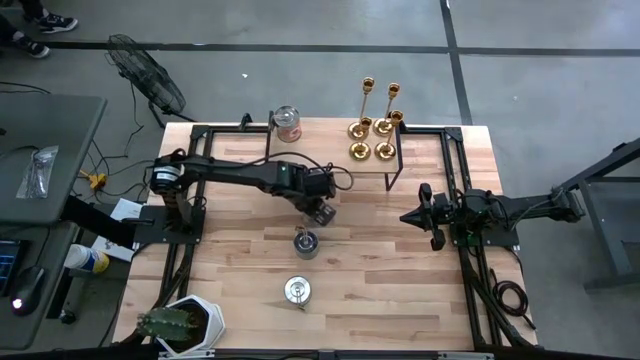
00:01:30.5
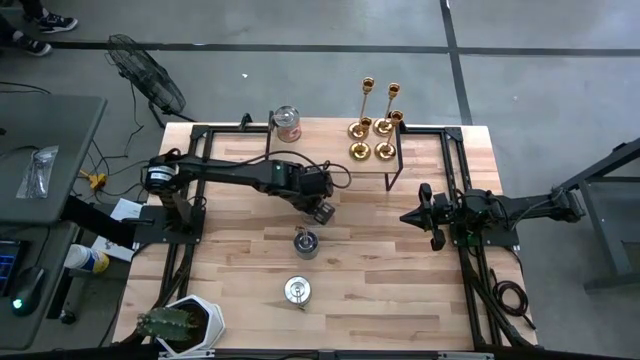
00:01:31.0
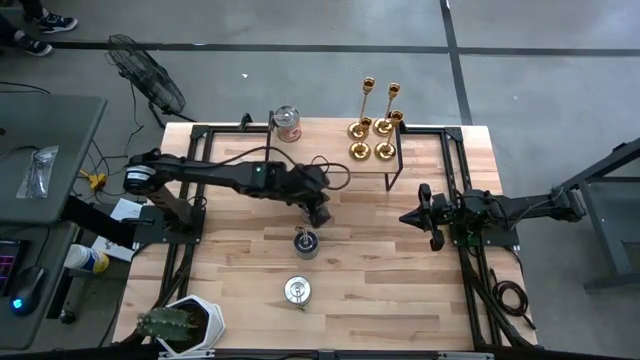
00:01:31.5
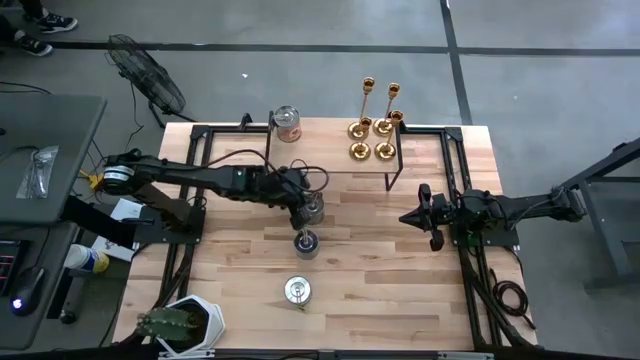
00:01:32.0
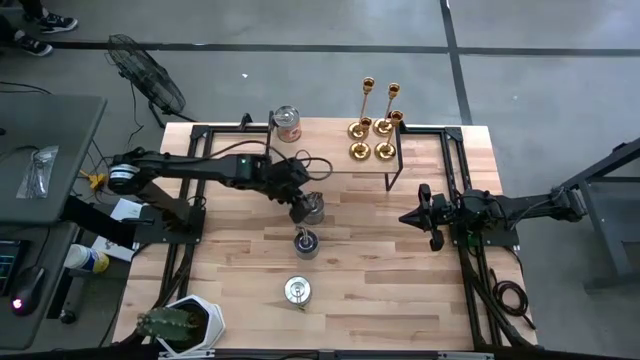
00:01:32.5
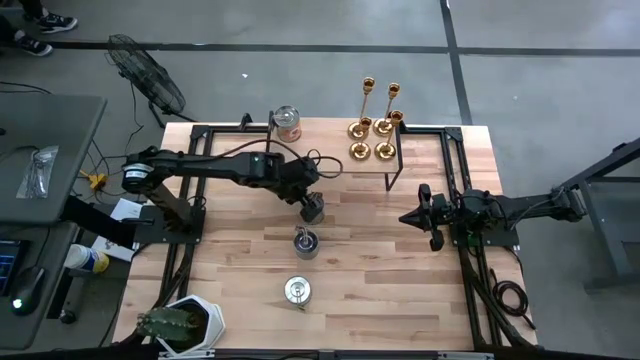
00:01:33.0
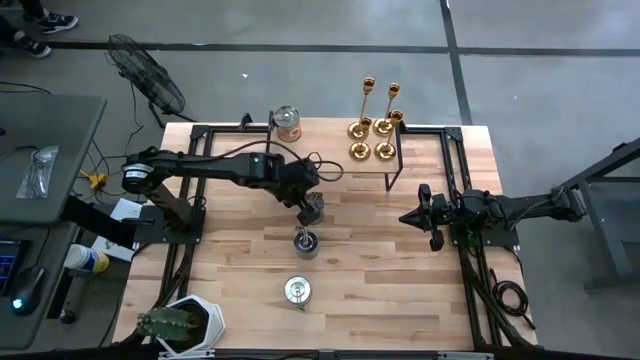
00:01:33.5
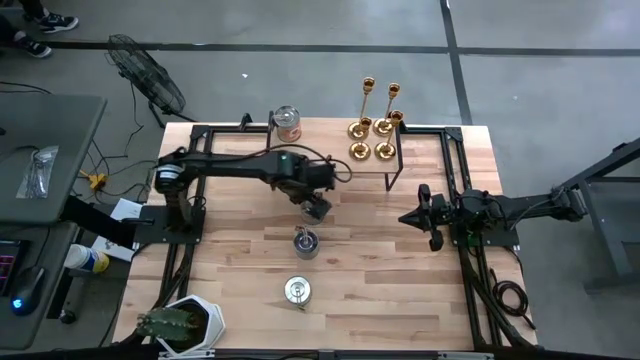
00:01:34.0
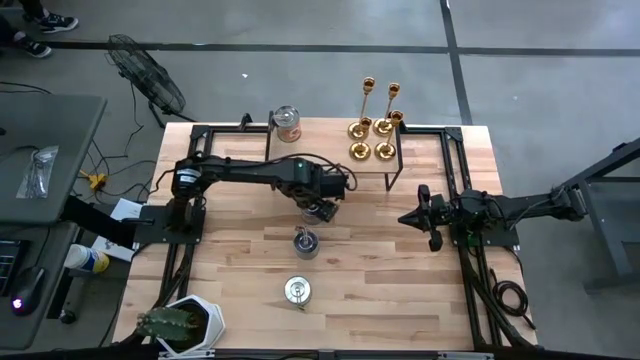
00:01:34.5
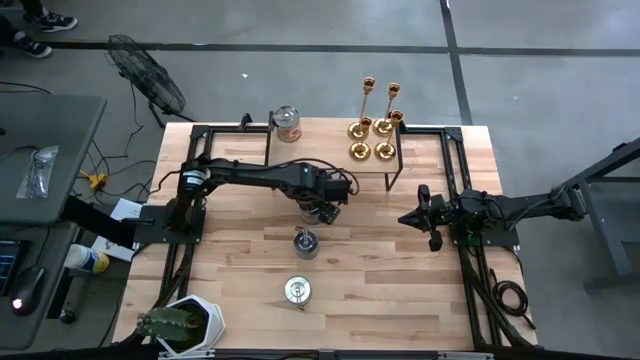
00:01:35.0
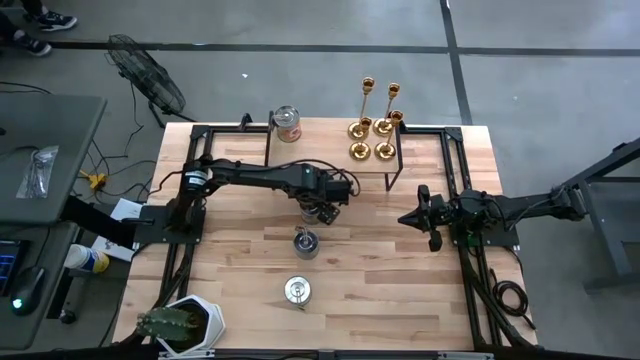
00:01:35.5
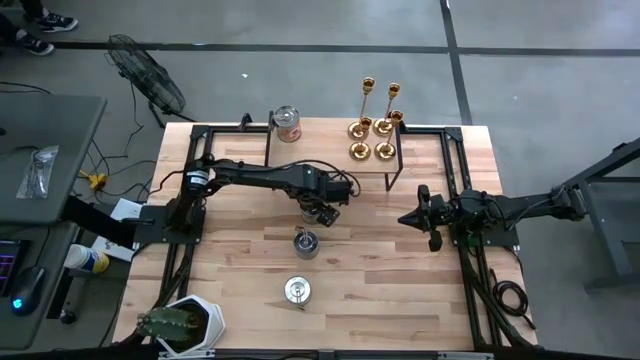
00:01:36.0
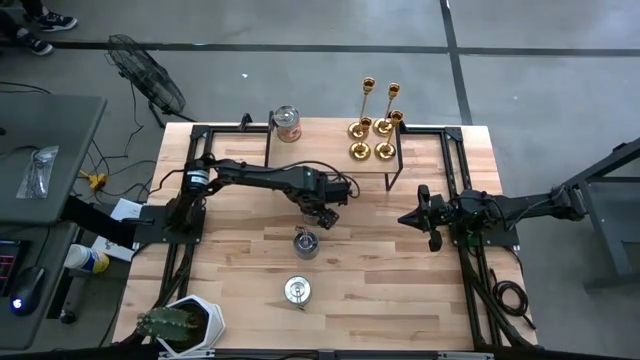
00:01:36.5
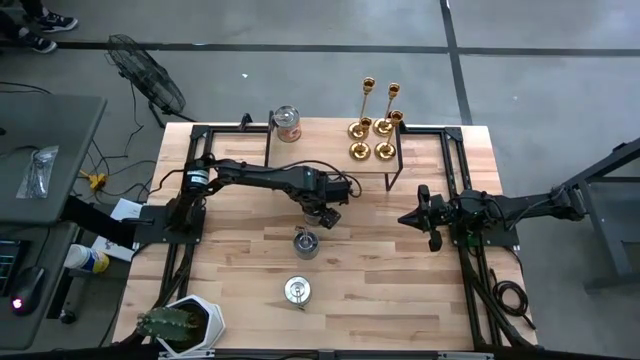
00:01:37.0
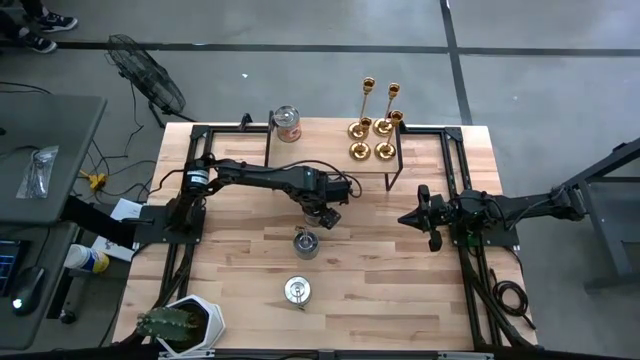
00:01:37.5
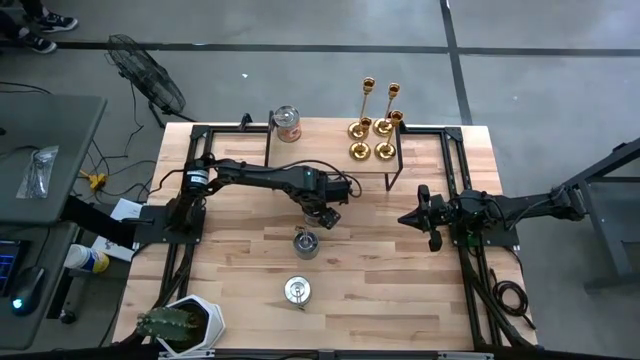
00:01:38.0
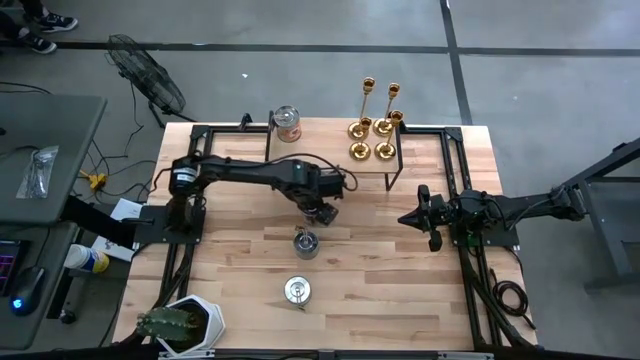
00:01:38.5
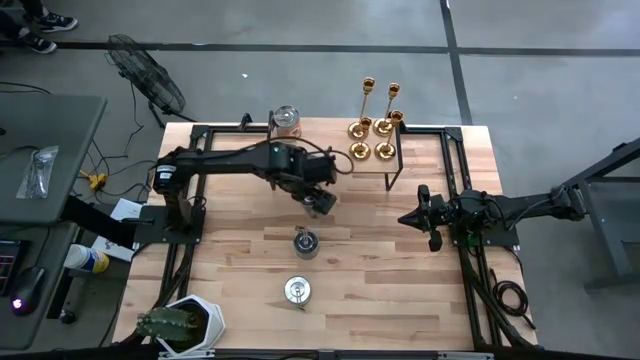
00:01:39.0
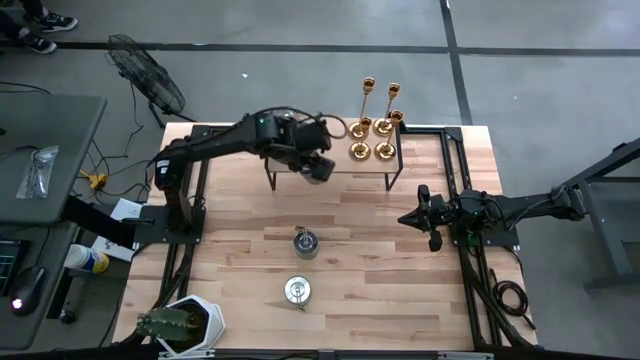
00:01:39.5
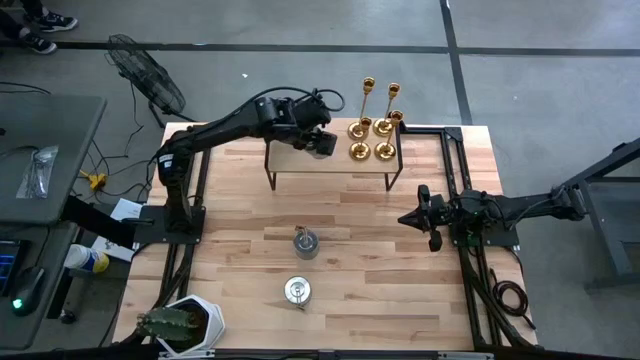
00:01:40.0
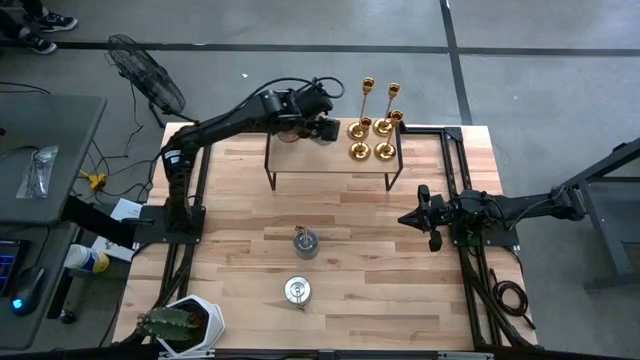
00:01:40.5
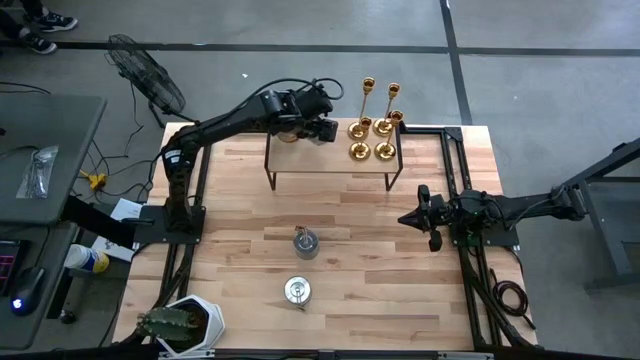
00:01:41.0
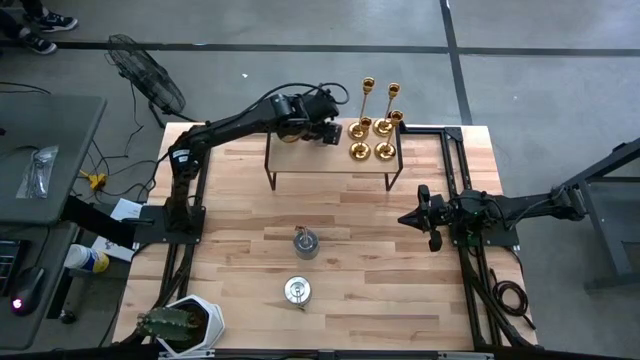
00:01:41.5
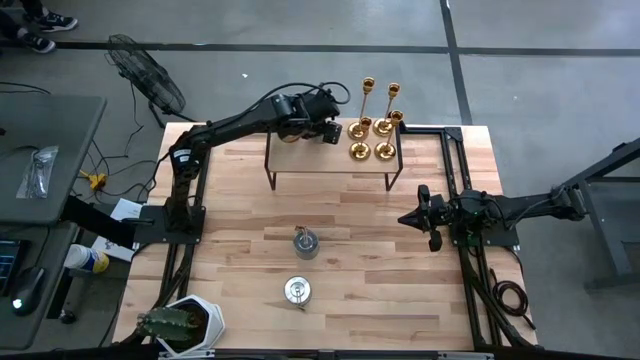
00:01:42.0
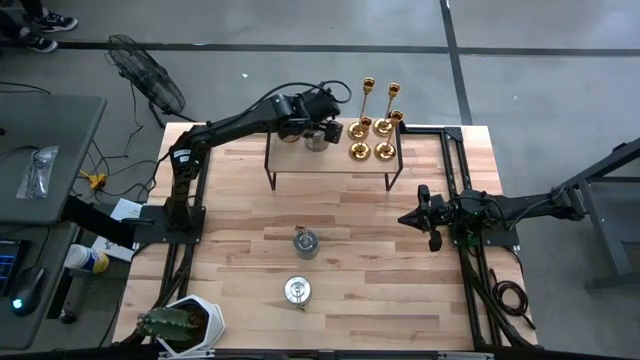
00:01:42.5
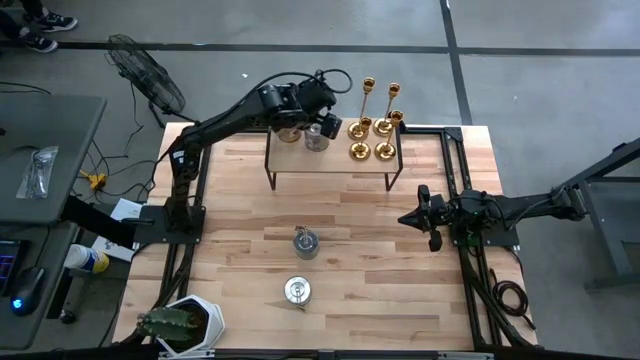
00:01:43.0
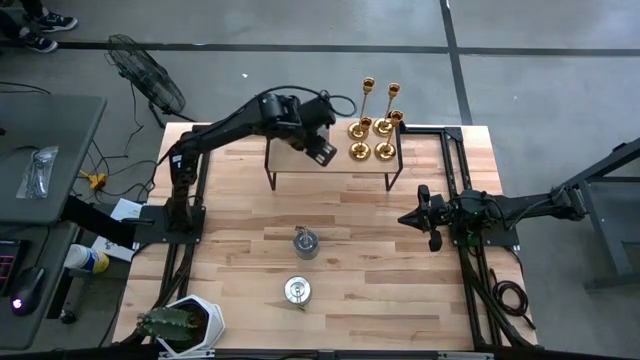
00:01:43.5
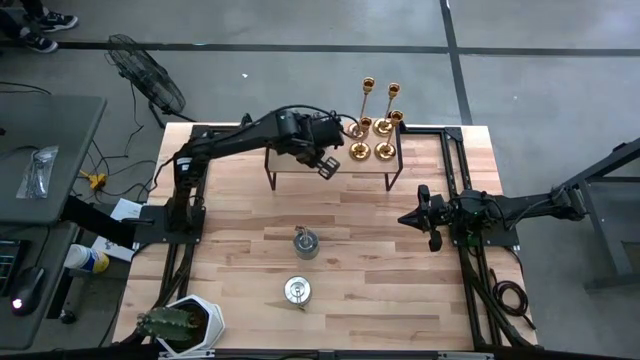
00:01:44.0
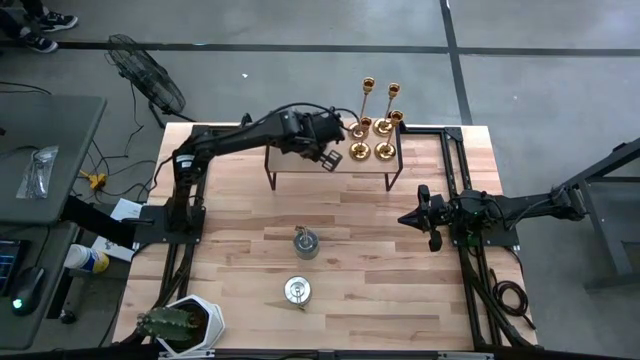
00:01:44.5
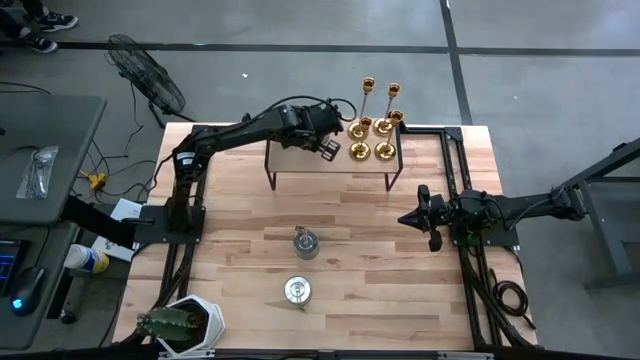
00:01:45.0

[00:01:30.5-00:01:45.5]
Task: Pick & Place candle stick holders
Put the brown scented candle on the shelf

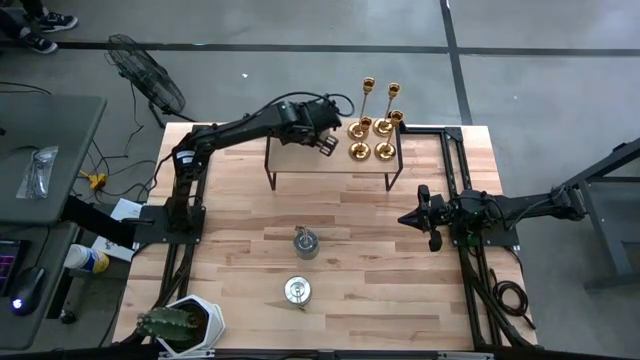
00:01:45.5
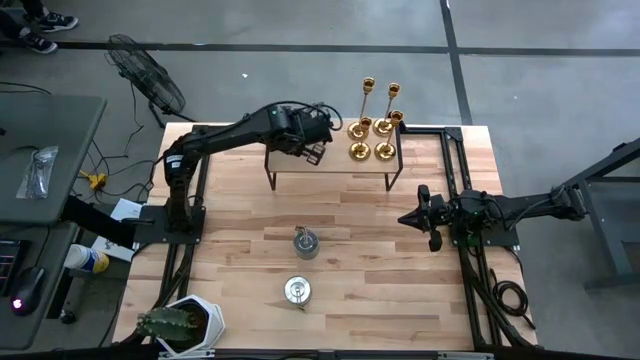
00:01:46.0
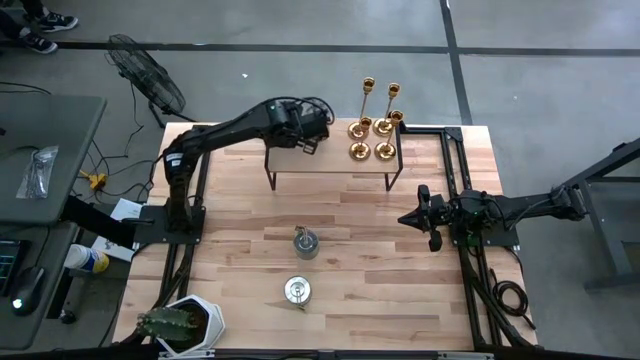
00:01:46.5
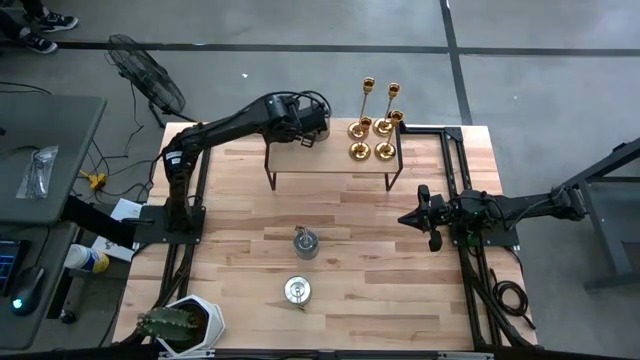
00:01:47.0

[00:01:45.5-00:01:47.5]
Adjust the orange scented candle on the shelf

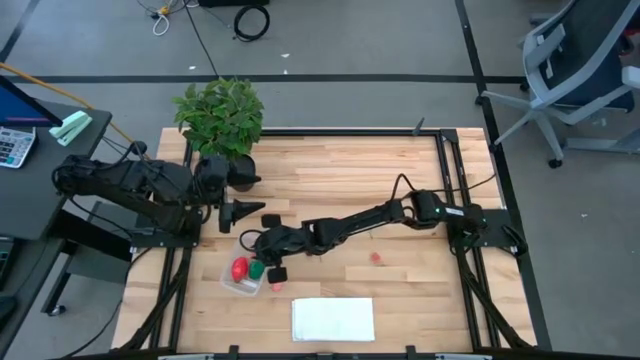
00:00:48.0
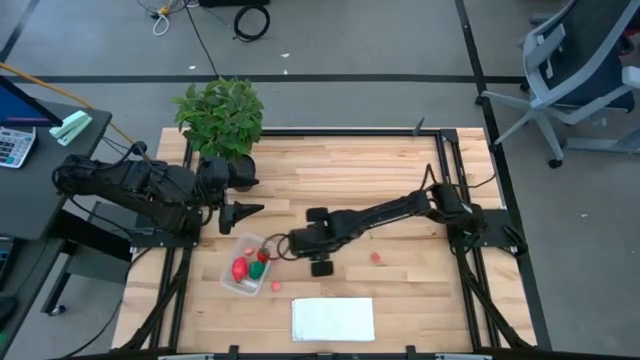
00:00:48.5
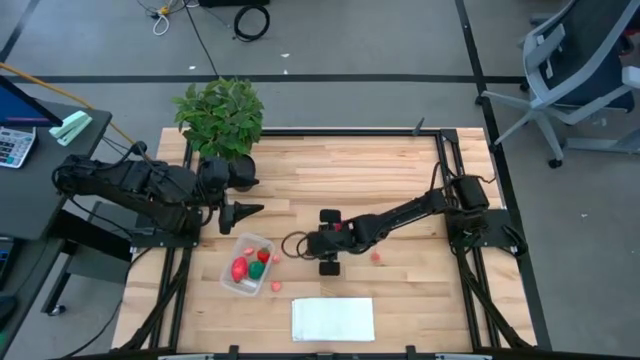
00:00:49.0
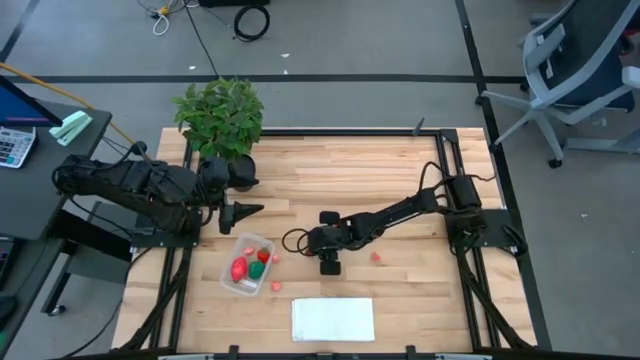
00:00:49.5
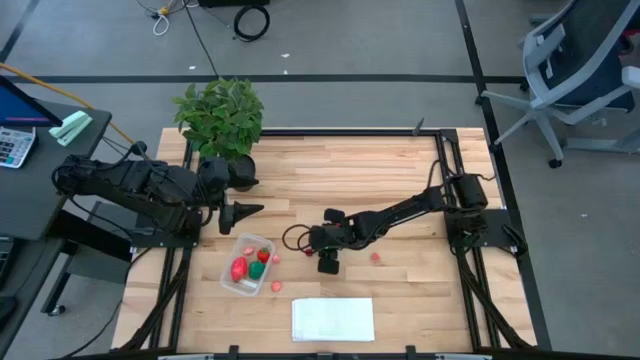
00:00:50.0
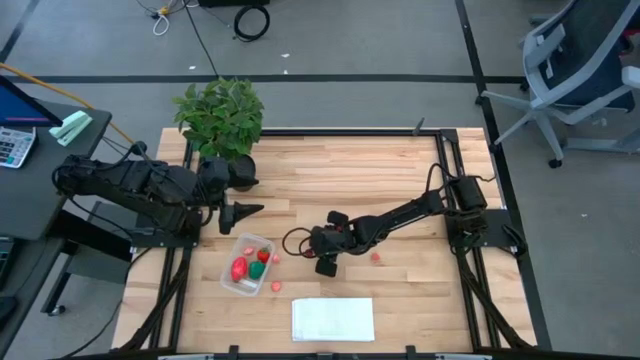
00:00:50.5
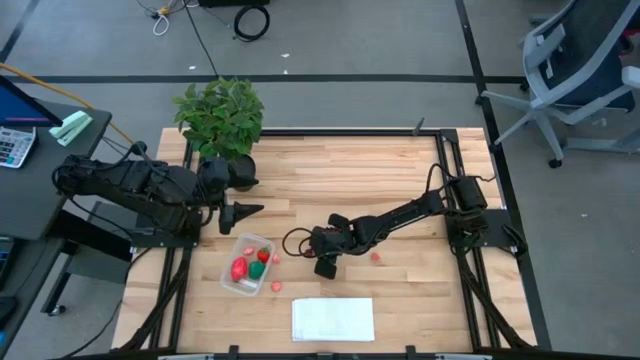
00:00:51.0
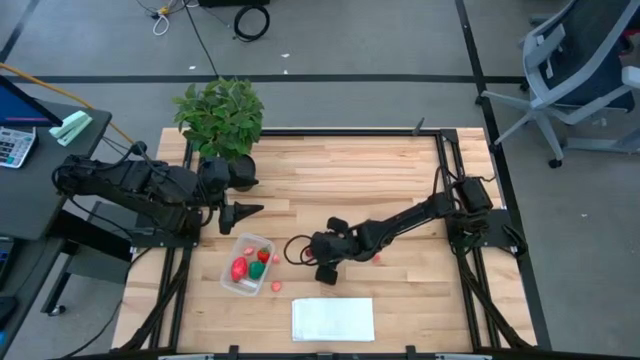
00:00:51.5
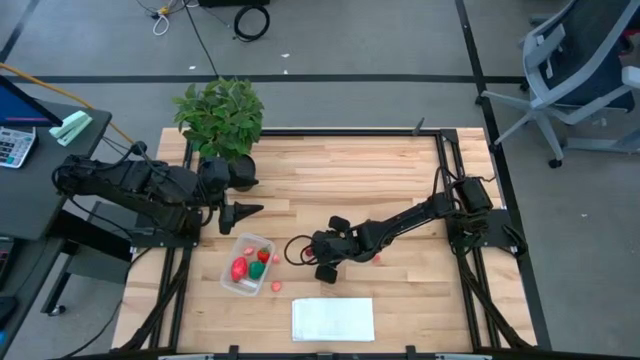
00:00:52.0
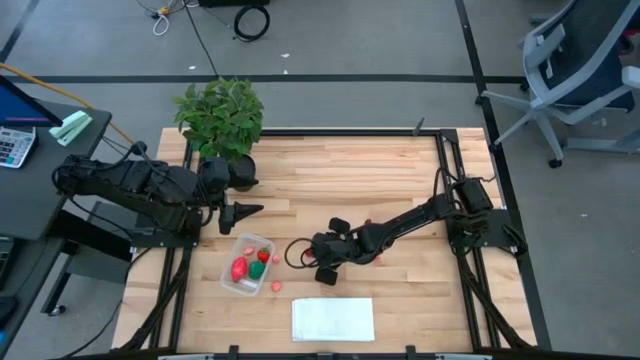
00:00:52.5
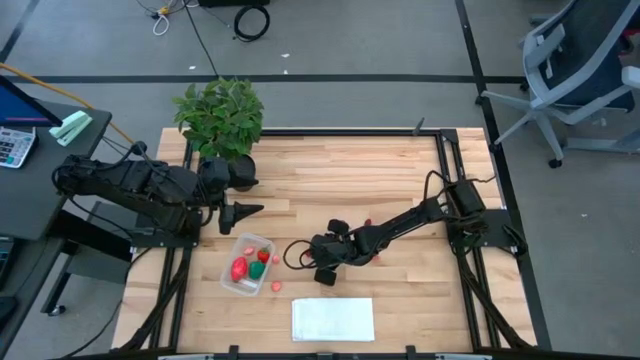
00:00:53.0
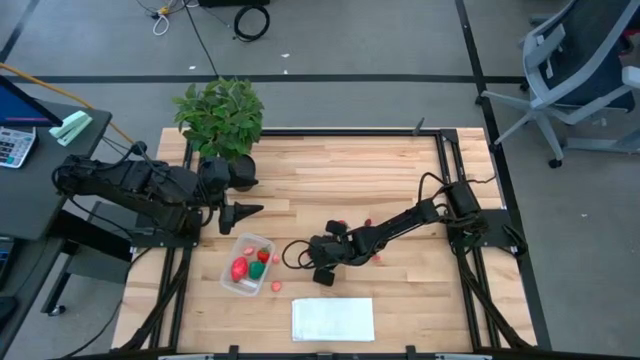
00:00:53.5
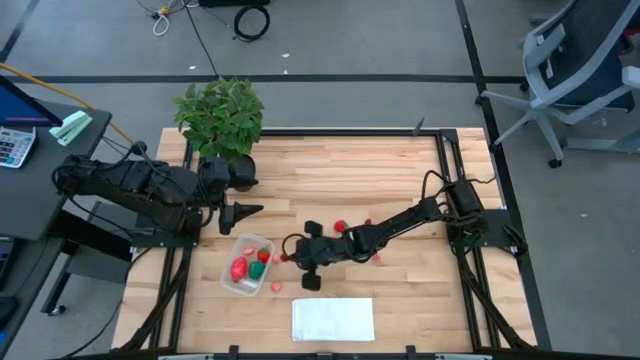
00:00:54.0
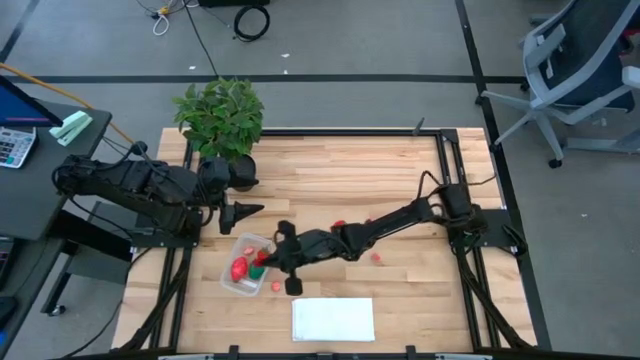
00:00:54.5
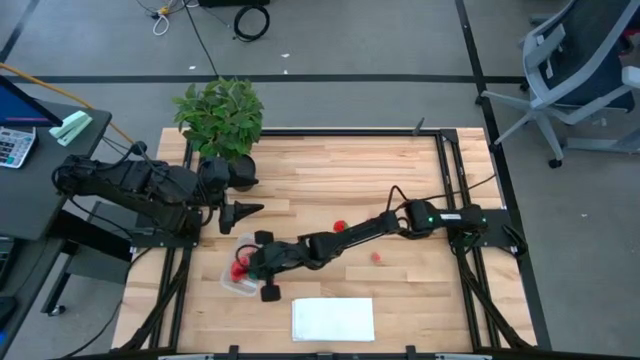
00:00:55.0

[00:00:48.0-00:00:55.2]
Task: Pick and placing Produce into tupperware
Put the red cherry into the transparent bin
